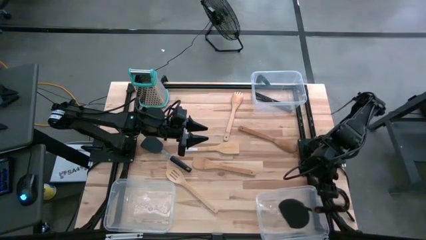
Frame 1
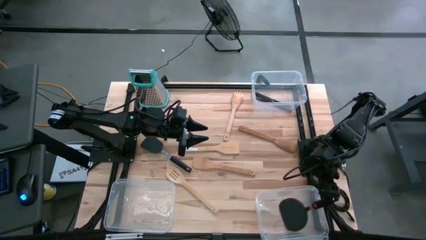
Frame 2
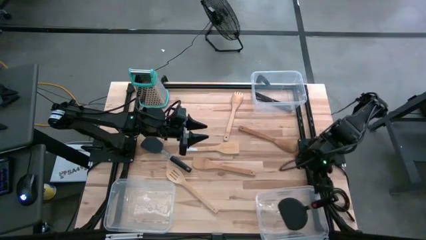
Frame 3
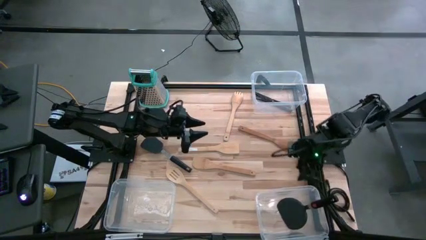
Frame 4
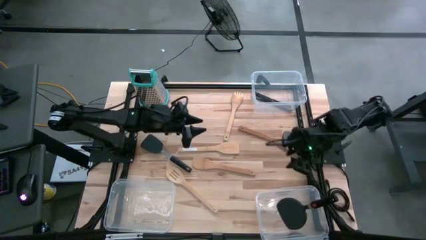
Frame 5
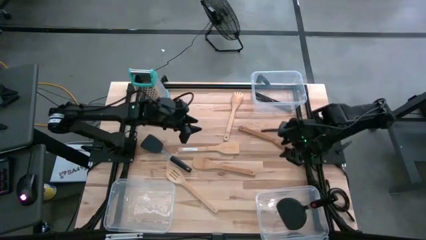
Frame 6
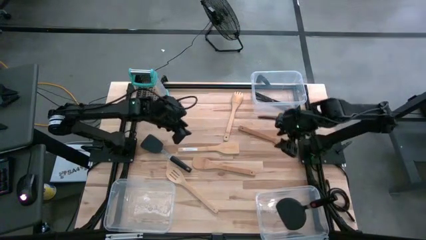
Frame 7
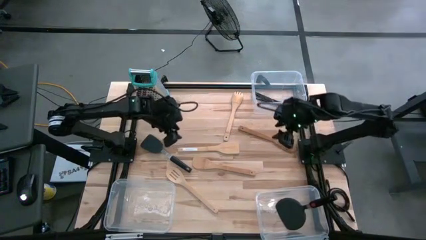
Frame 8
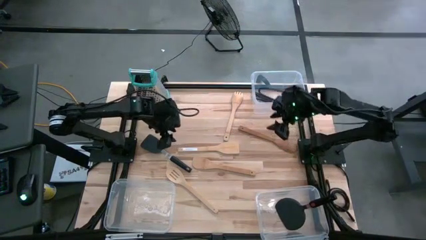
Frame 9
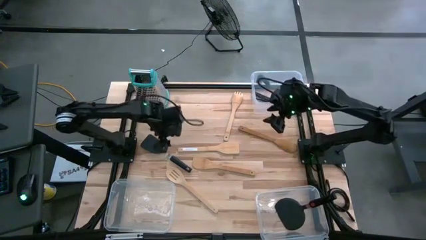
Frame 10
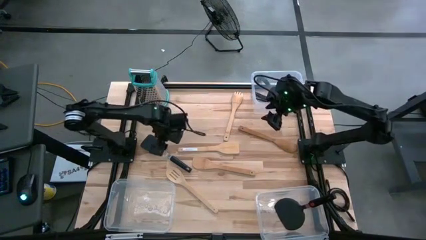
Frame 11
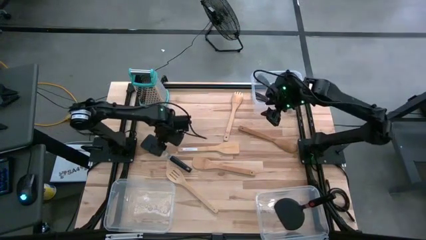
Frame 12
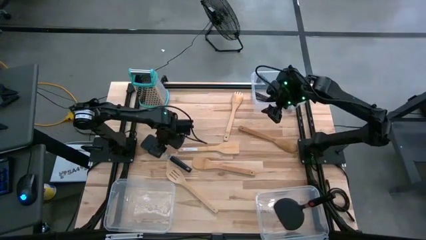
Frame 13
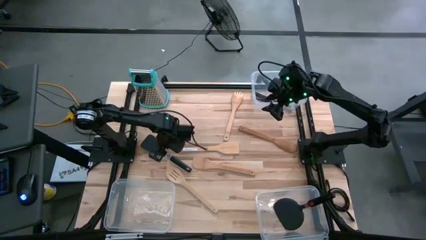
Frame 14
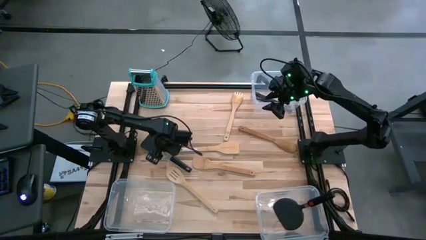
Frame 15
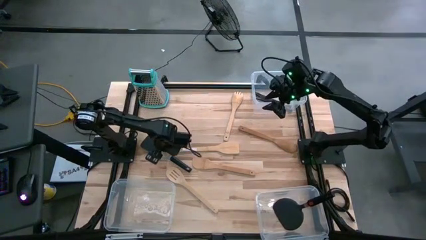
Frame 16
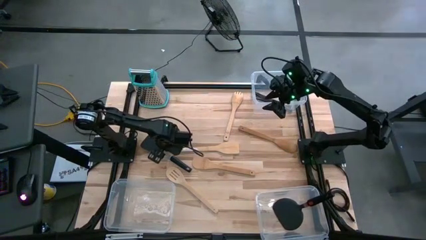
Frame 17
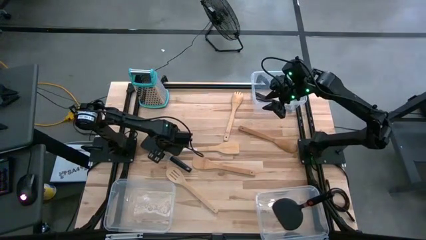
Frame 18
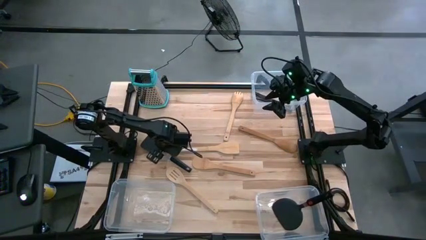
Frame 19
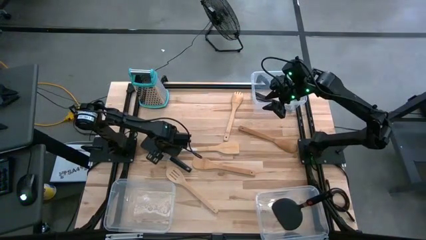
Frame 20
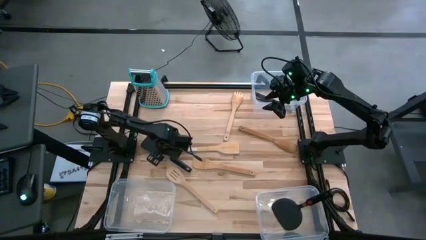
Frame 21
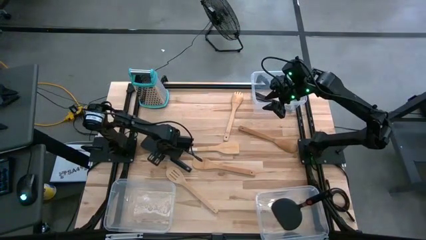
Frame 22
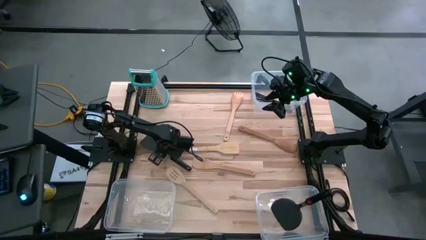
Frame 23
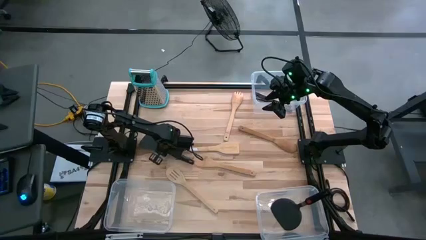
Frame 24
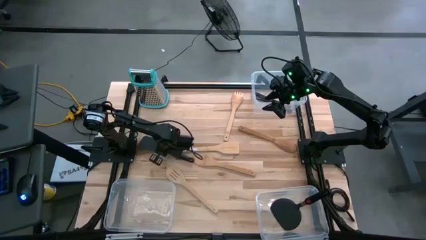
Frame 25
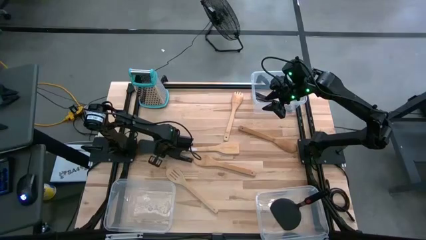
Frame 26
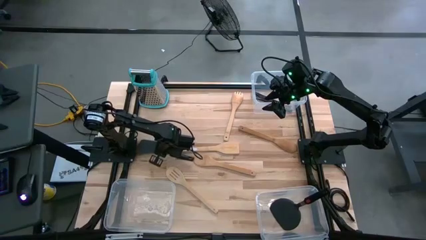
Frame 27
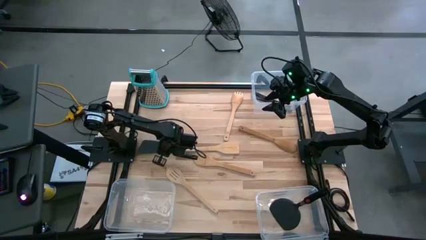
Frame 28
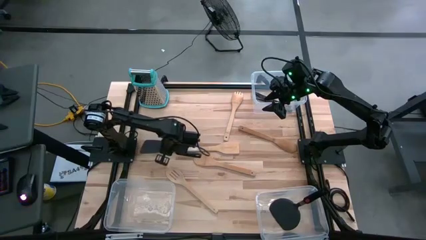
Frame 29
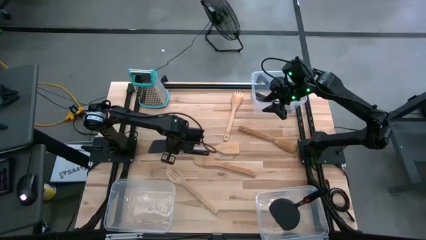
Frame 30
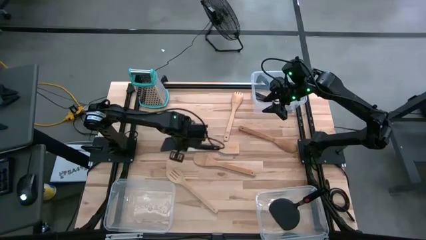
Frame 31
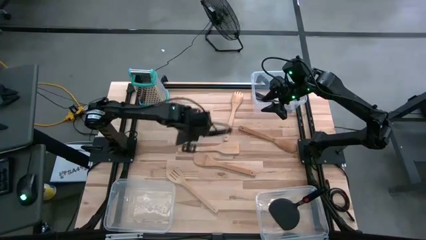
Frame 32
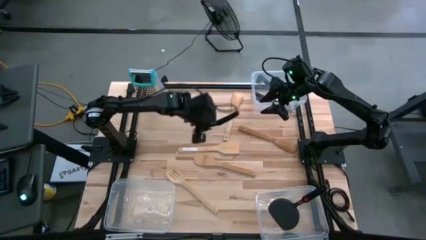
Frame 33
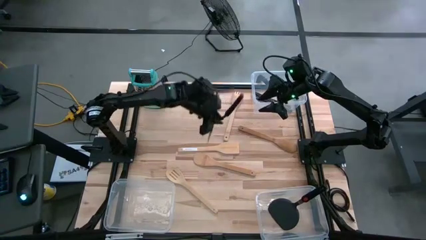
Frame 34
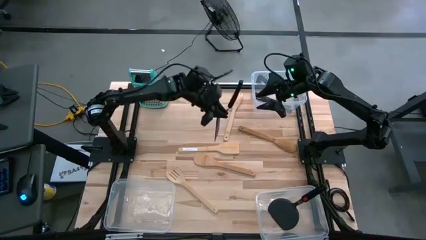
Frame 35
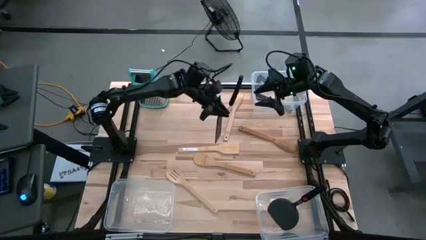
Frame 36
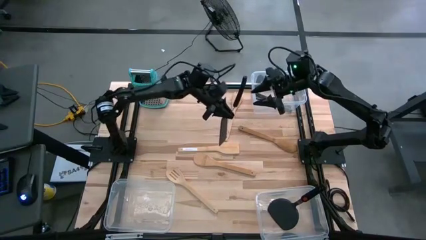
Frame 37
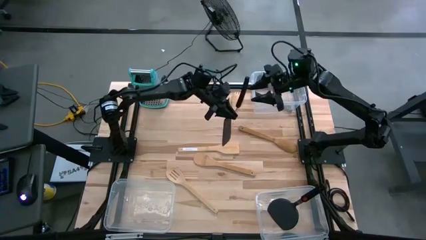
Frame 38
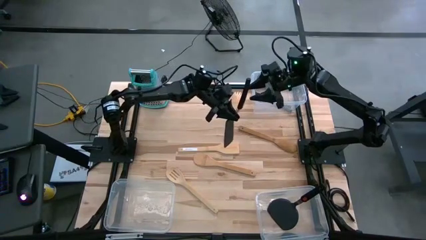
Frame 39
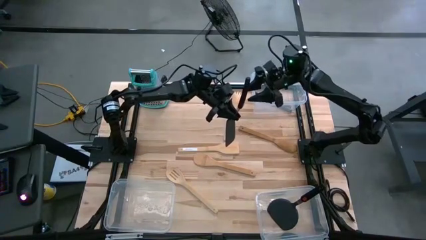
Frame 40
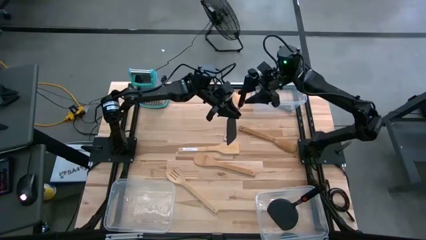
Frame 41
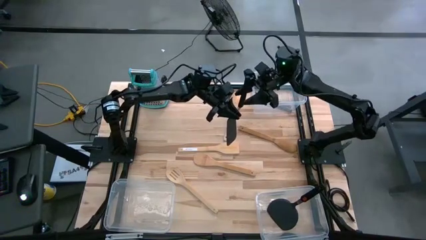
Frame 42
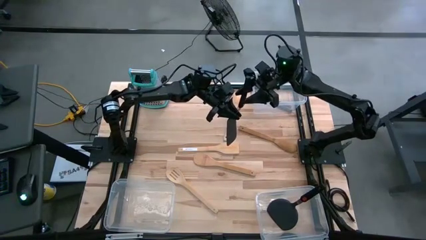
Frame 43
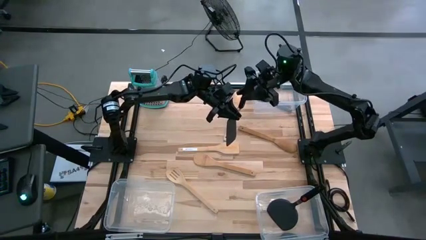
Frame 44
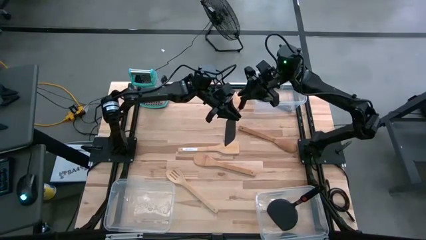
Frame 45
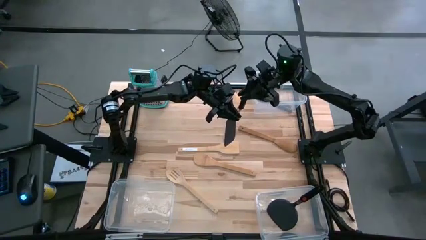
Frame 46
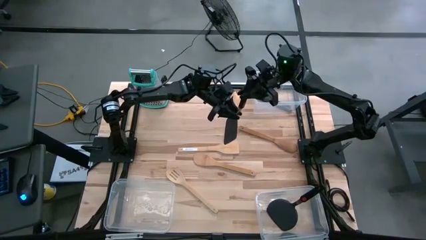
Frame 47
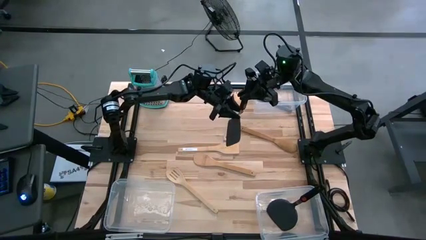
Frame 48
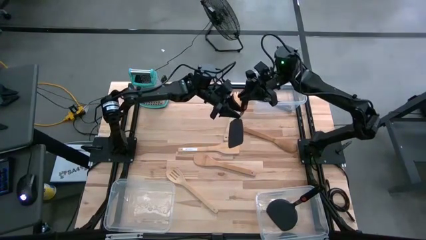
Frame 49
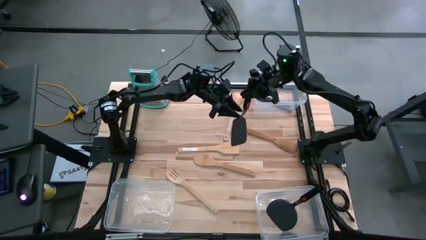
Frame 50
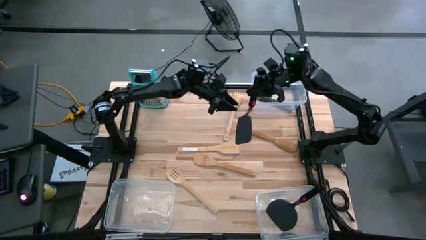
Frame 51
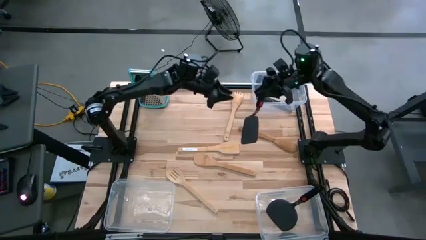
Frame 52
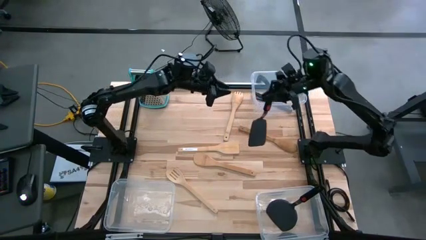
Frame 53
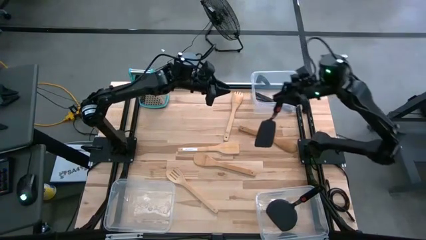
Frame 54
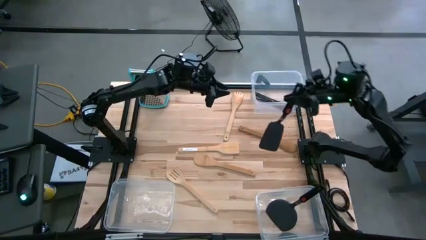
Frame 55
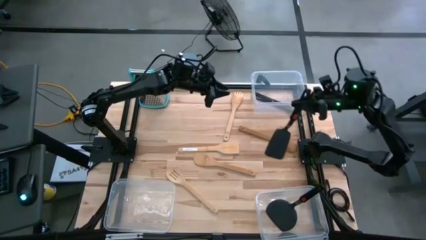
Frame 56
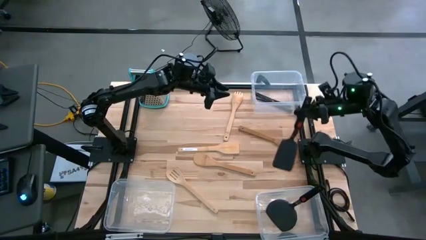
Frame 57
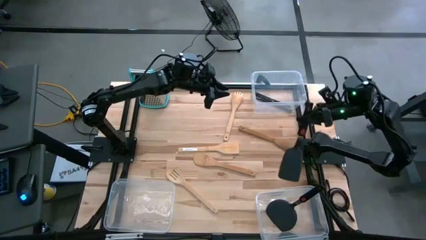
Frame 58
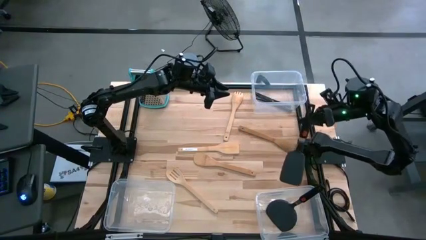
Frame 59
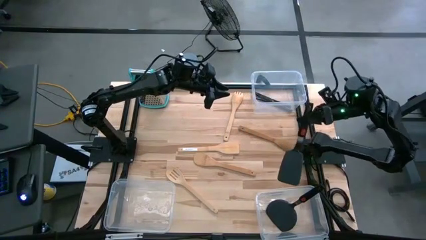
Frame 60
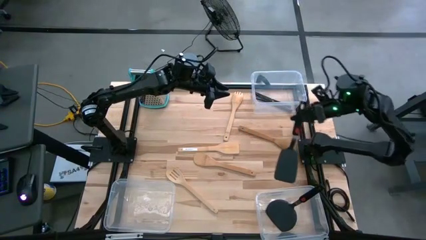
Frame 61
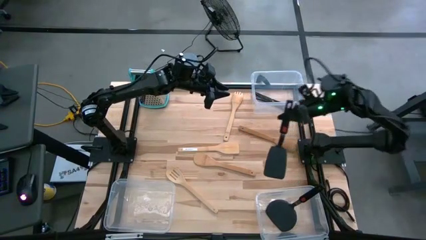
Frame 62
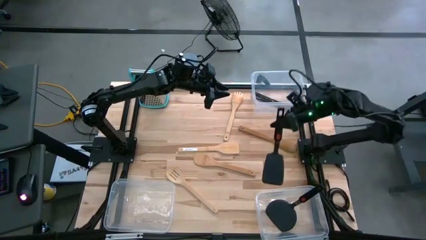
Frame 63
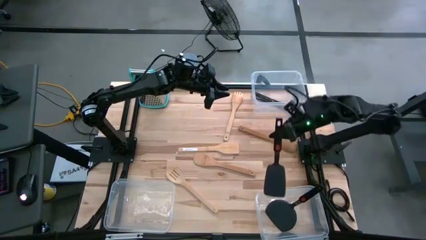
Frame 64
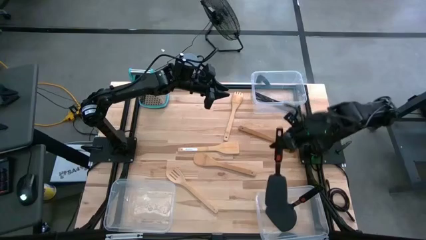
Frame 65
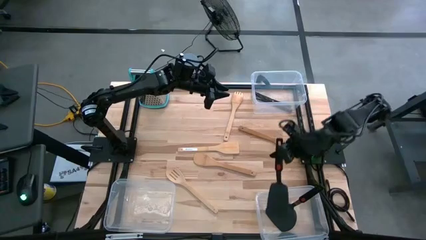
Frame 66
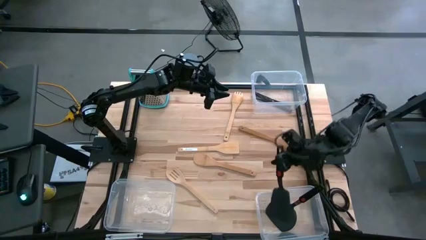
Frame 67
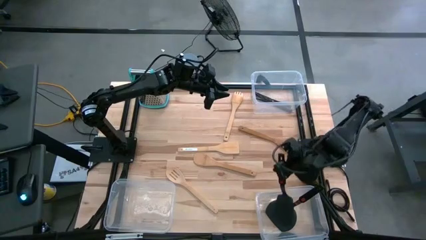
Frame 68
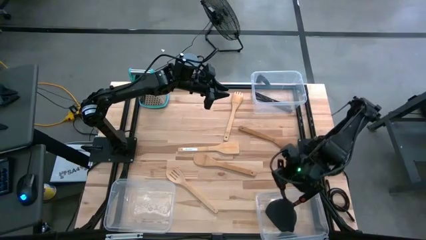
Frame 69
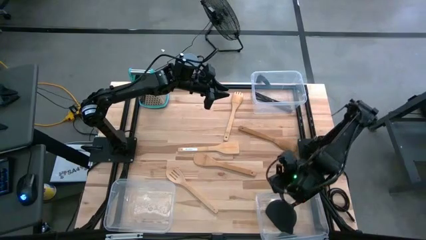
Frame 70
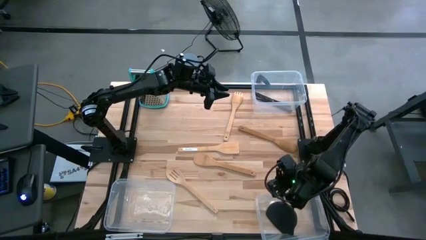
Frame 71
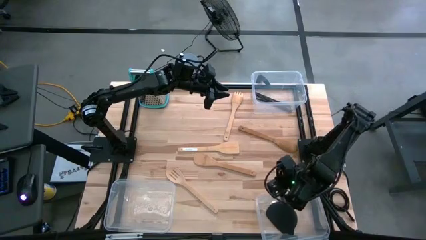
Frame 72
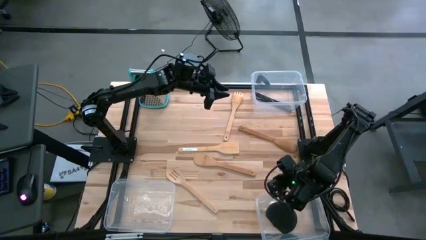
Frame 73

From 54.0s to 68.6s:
Task: Pick & Place Kitchen Items
Put the black spatula into the transparent bin

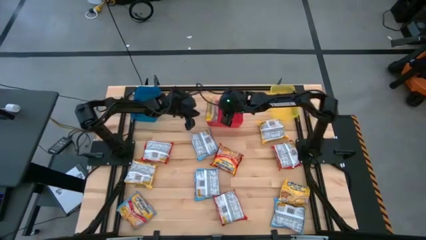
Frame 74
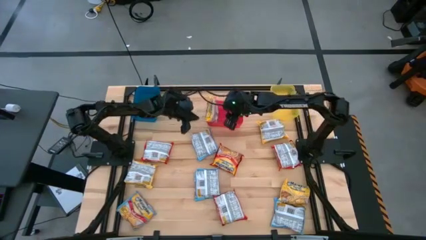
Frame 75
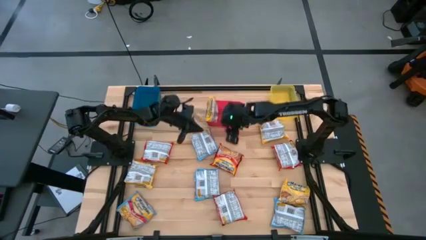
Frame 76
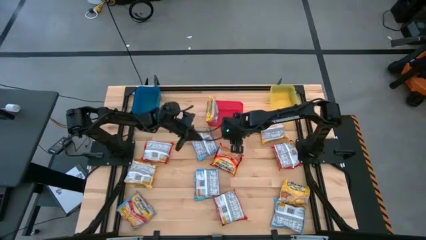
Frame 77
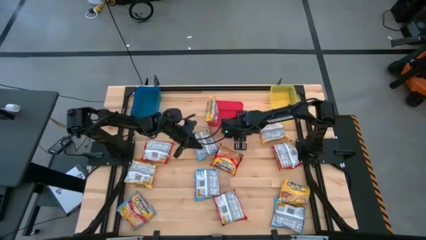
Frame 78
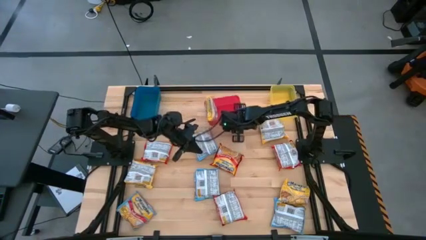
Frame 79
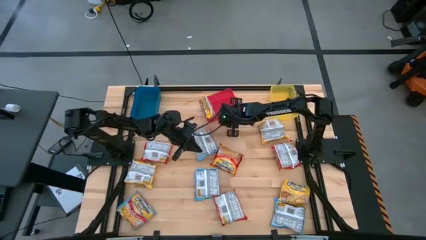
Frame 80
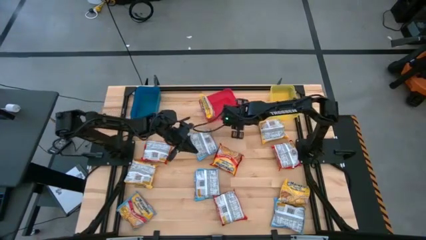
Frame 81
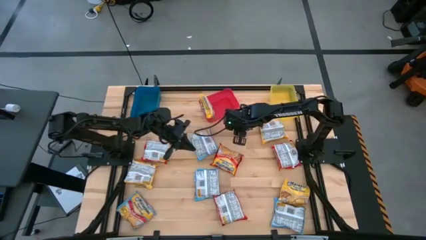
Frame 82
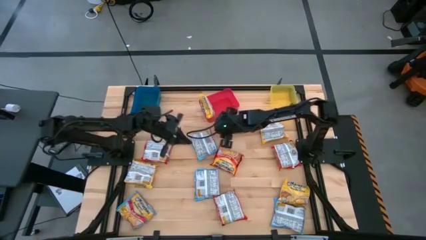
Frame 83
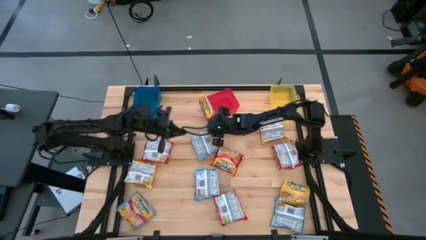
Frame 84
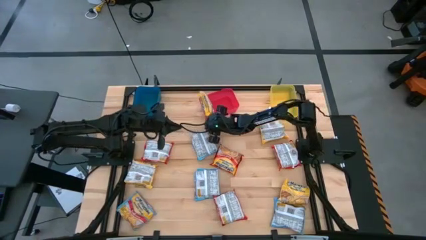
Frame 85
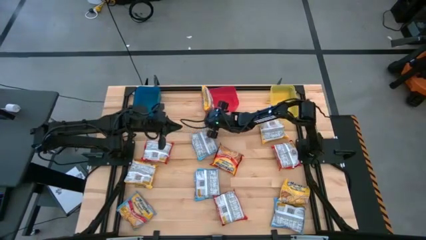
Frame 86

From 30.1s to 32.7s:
Task: Sort Maruchan noodles
Adjust the red bin
